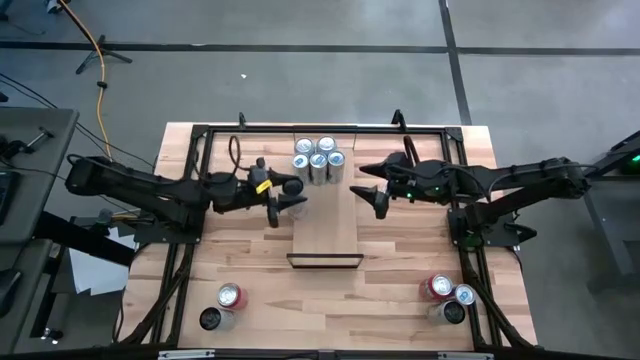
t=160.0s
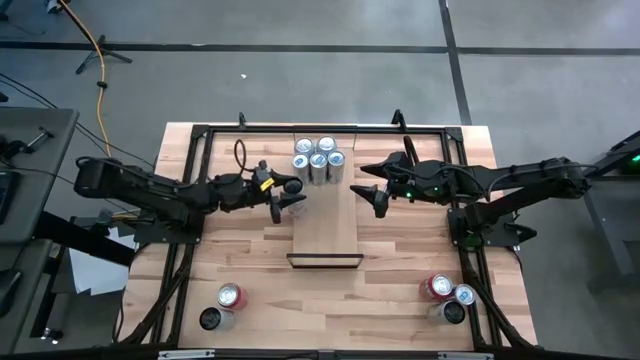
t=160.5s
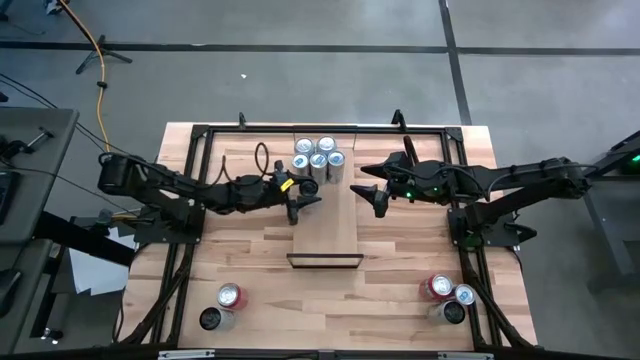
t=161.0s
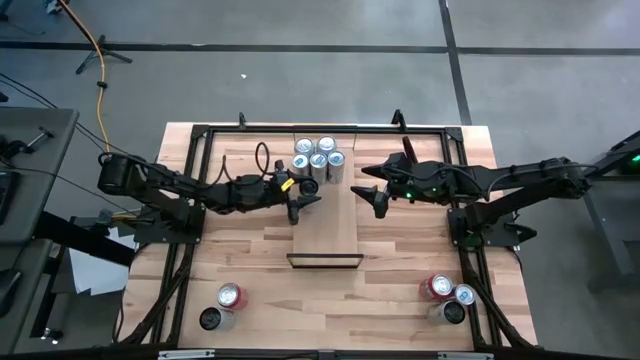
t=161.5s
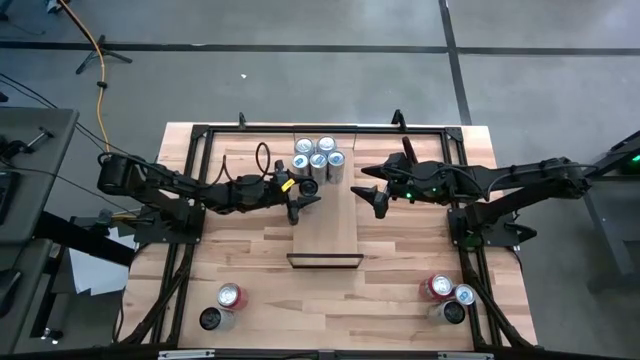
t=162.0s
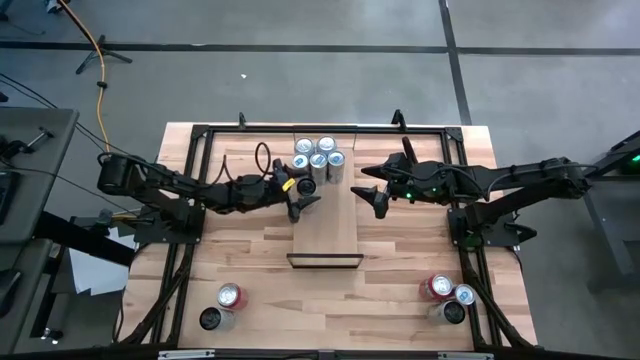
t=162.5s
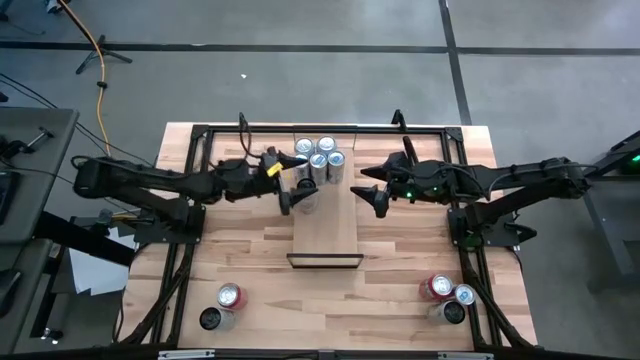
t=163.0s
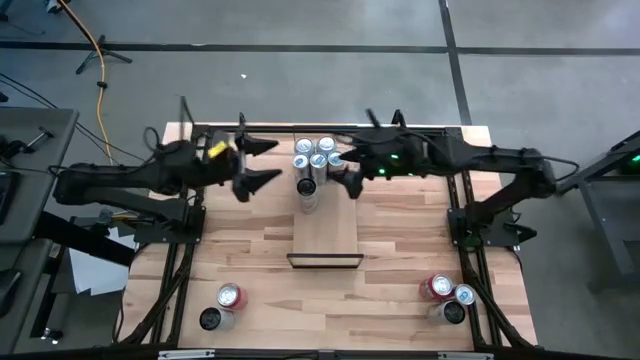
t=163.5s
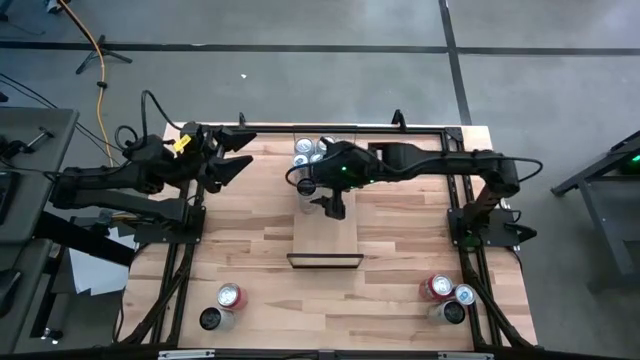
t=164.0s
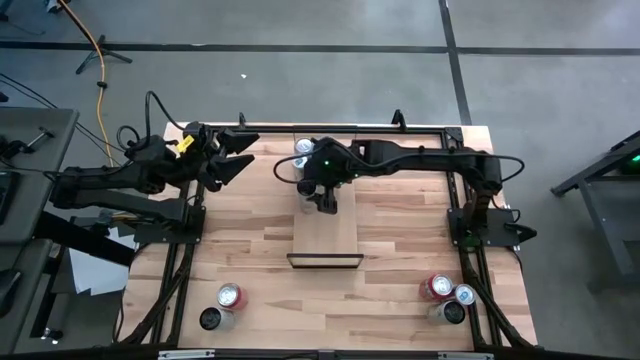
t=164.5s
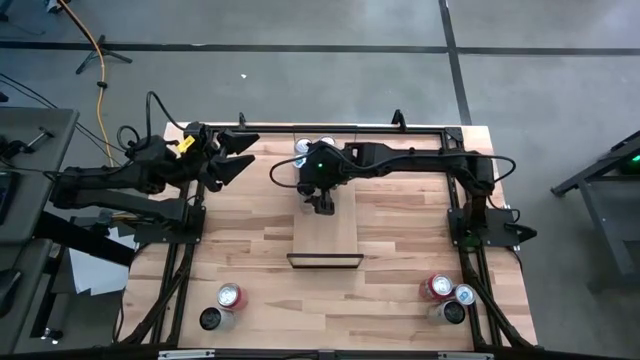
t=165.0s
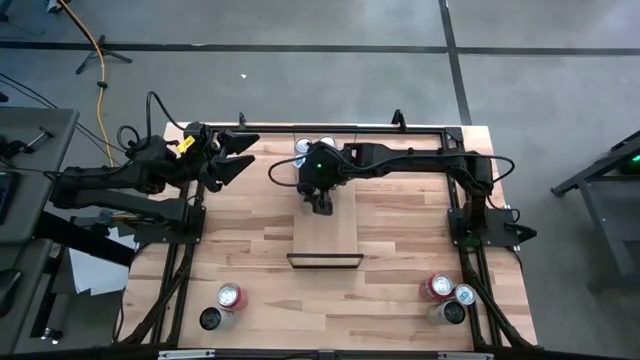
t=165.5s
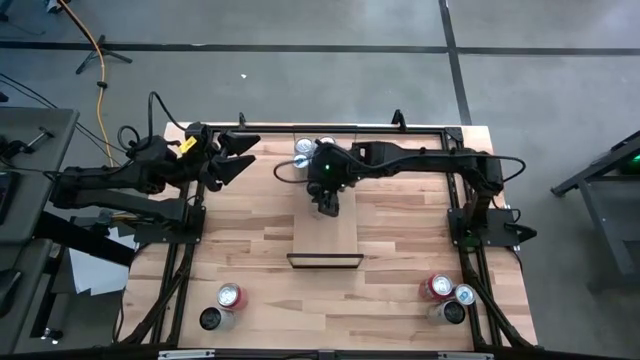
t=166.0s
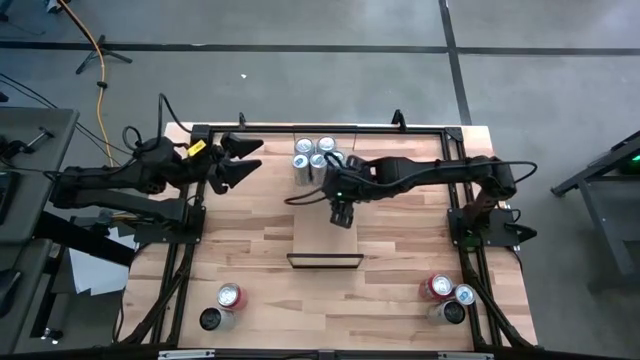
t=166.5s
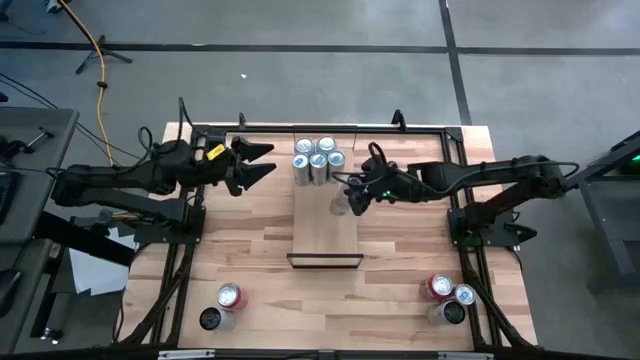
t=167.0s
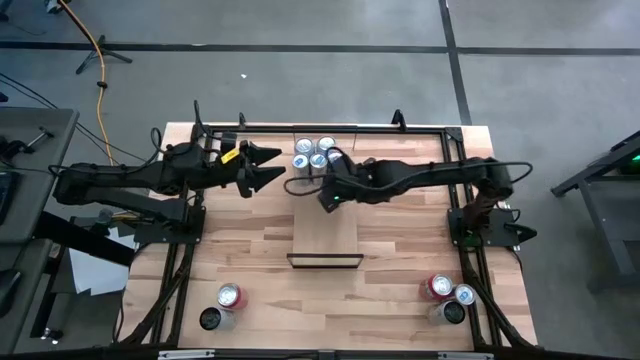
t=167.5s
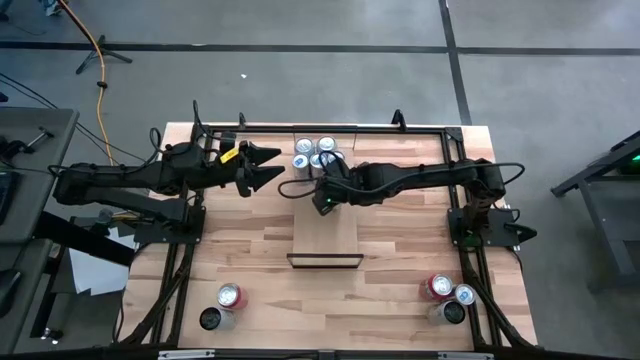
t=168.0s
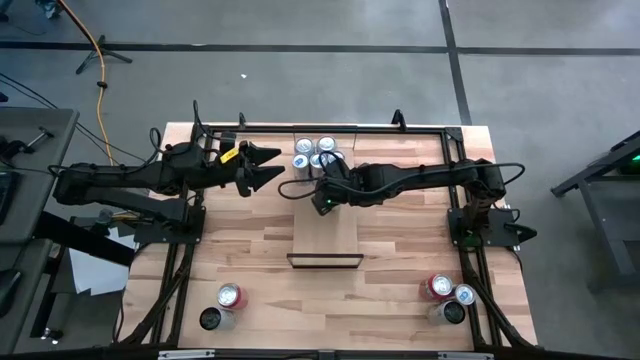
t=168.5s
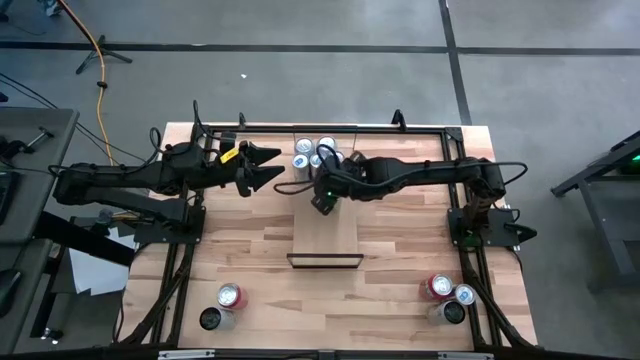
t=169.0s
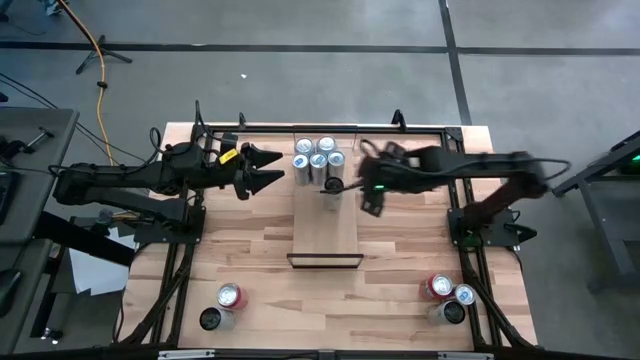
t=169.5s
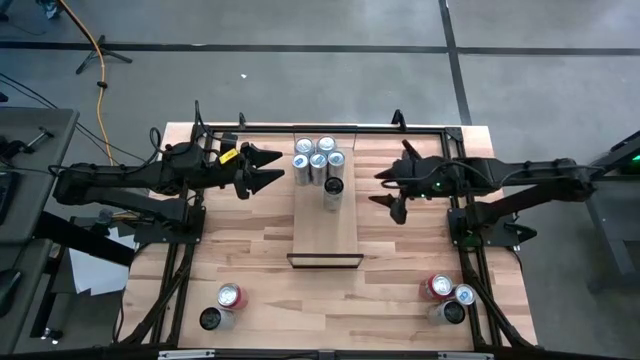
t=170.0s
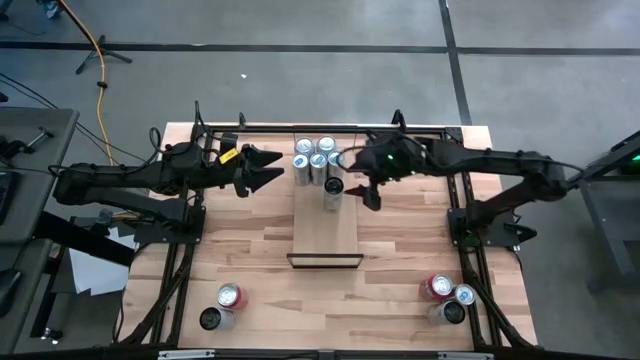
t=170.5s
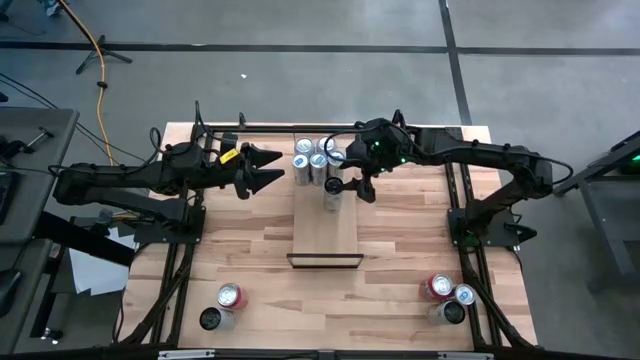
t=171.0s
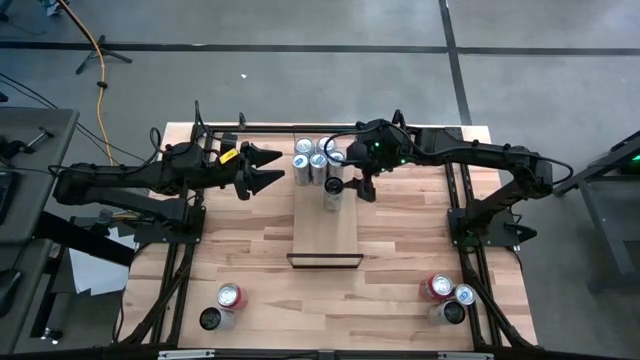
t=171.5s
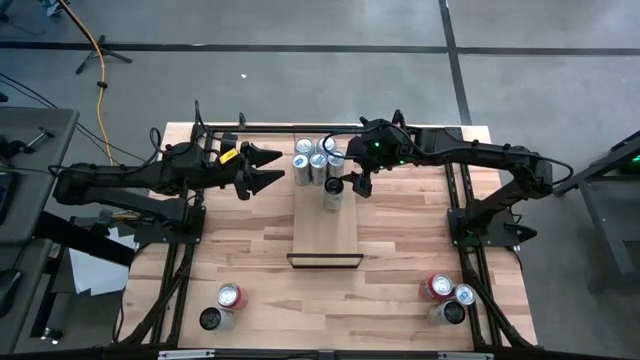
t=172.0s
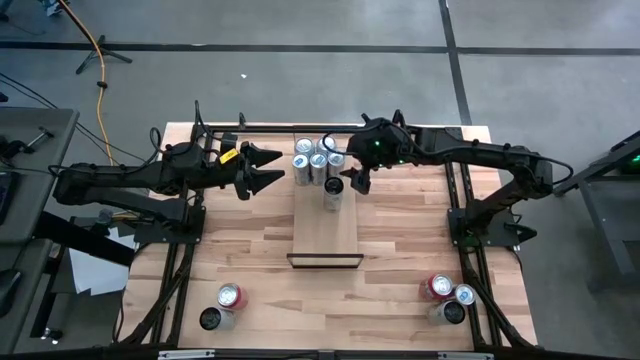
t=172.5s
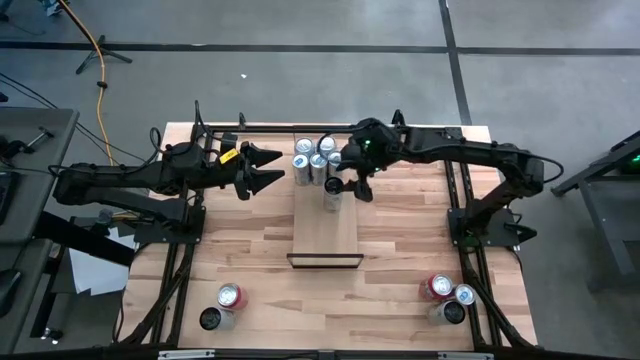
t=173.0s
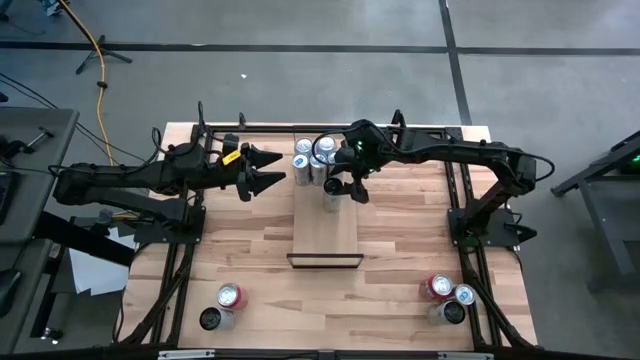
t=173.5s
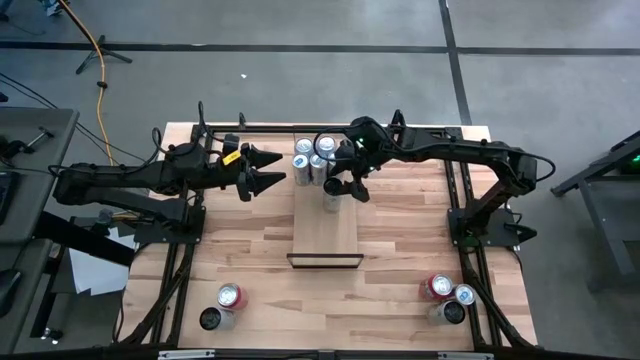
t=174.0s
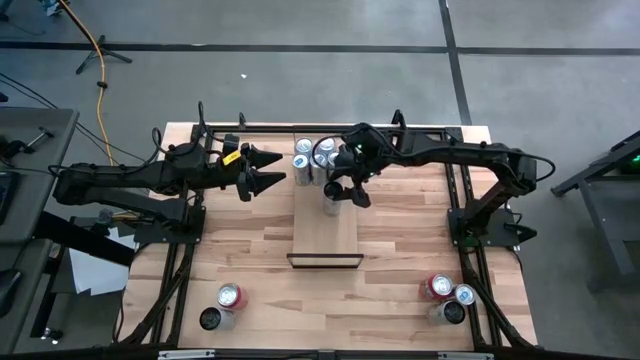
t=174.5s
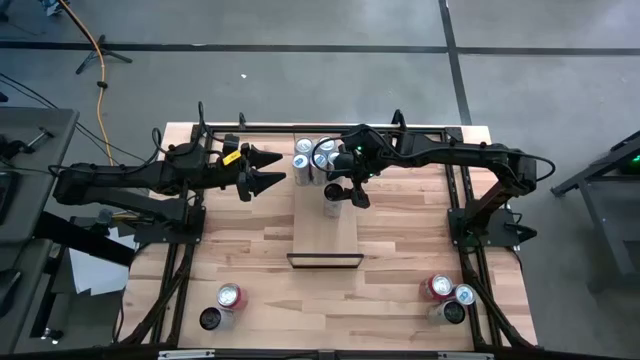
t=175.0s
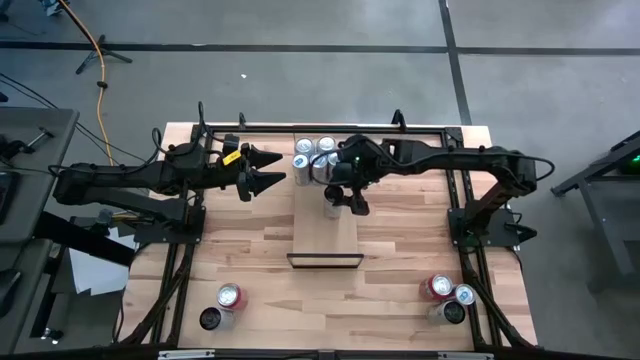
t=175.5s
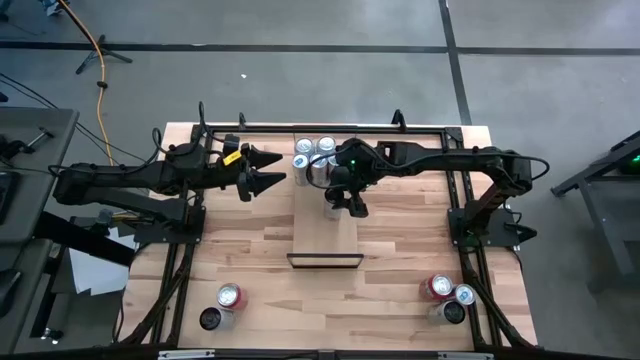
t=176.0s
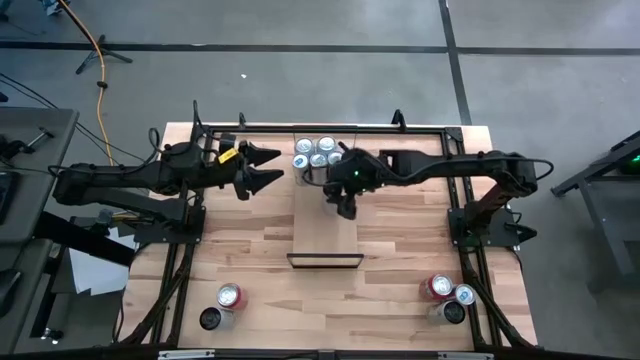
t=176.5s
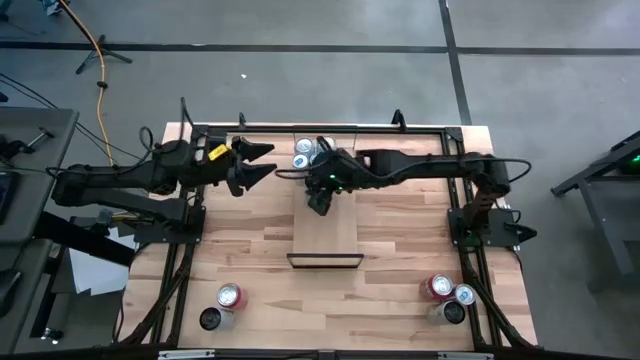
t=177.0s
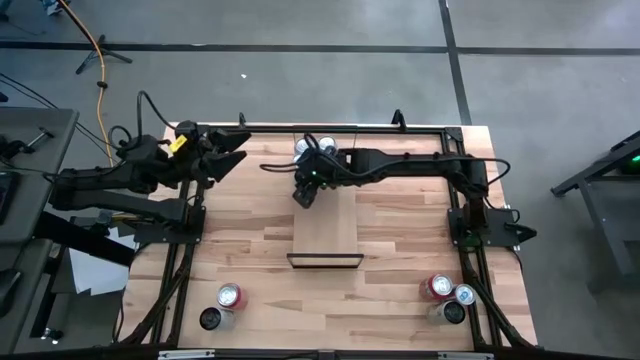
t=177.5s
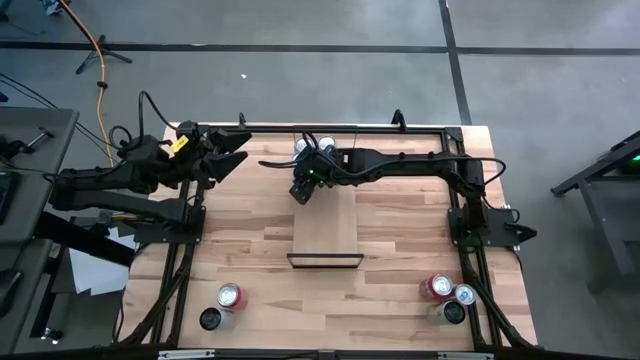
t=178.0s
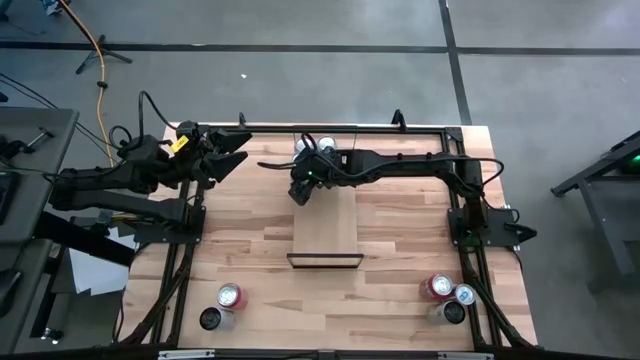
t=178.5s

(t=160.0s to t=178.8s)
Task: Place canned beverage on shelf
Put the white pink soda can on the shelf

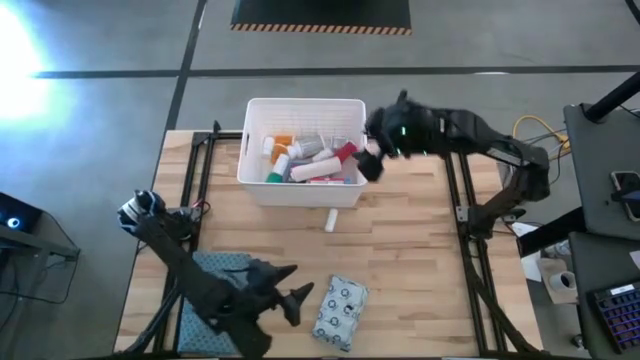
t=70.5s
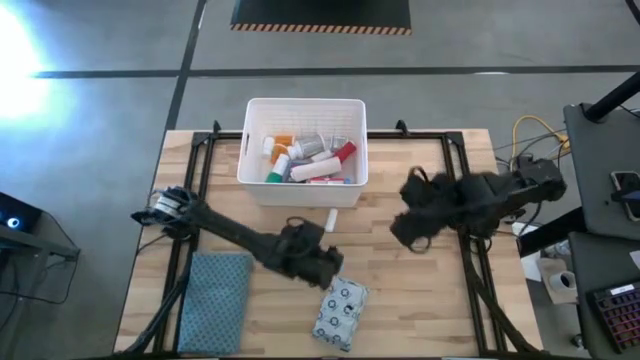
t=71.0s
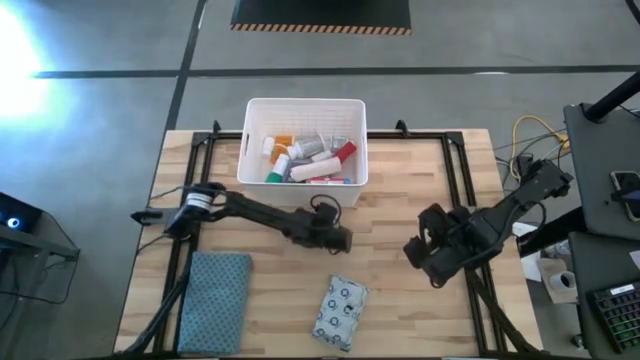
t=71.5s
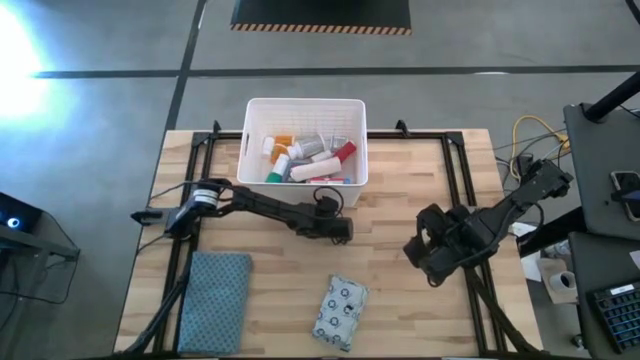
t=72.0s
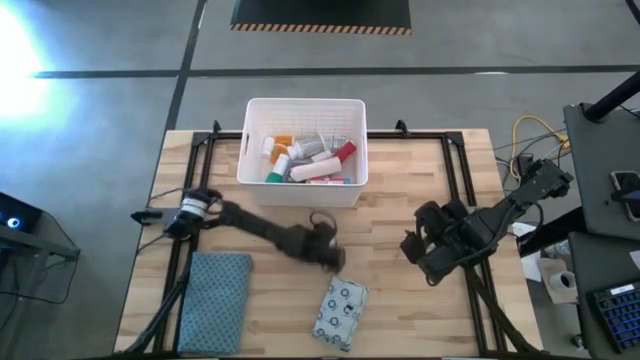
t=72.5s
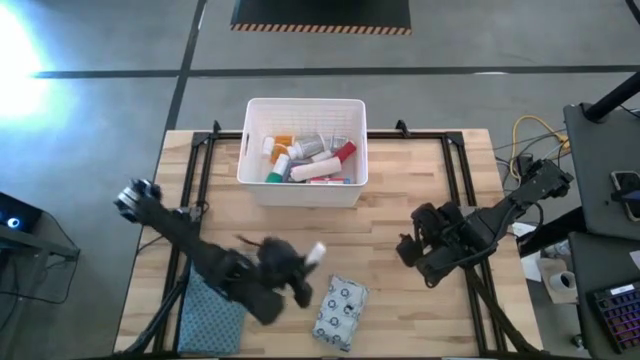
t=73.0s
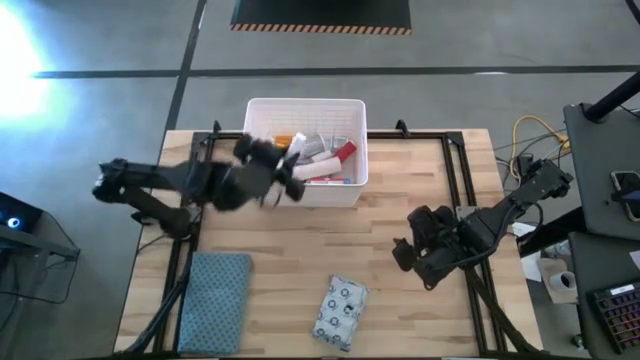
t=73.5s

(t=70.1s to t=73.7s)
Task: Pick & place medical supplies in basket/bin
Put the rolled gauze into the white bin
